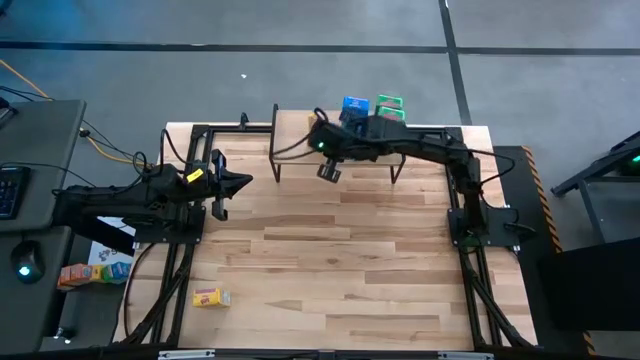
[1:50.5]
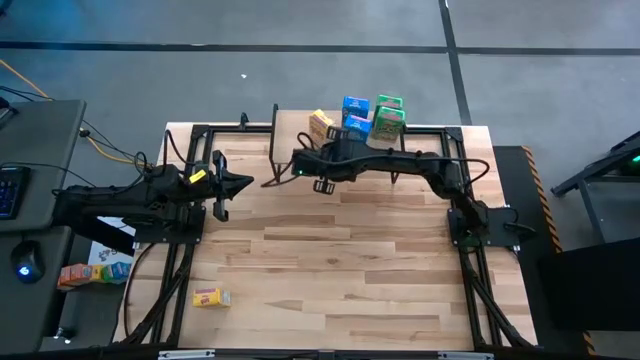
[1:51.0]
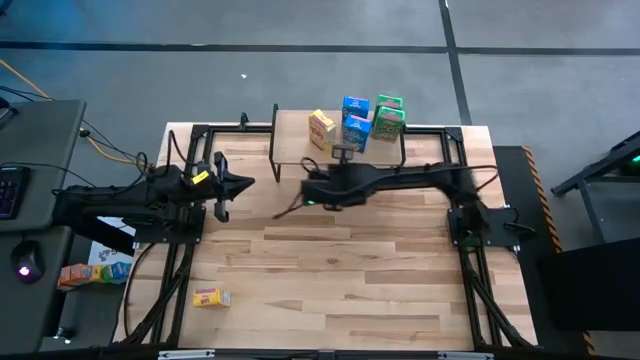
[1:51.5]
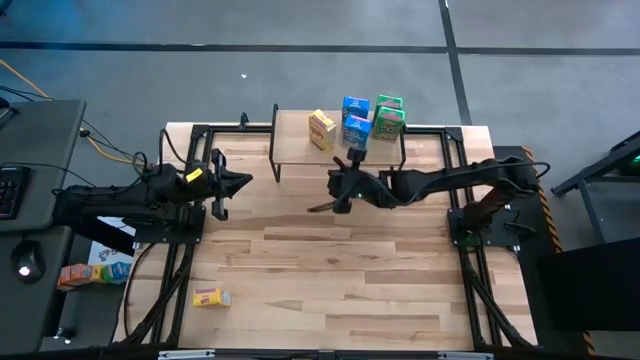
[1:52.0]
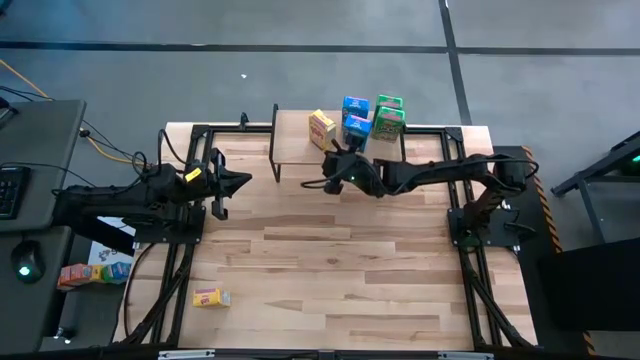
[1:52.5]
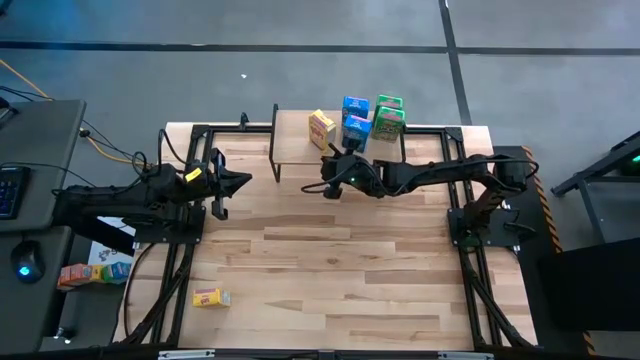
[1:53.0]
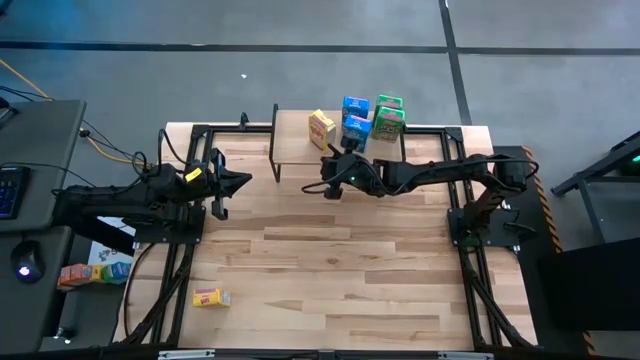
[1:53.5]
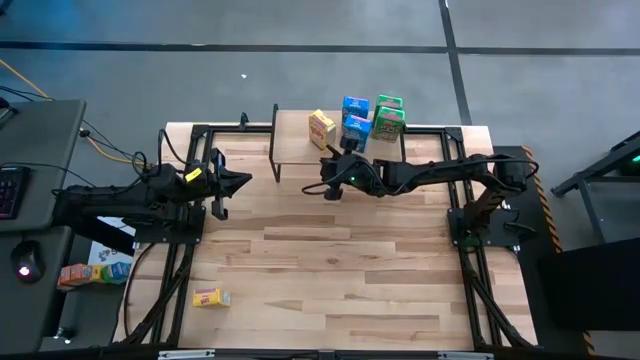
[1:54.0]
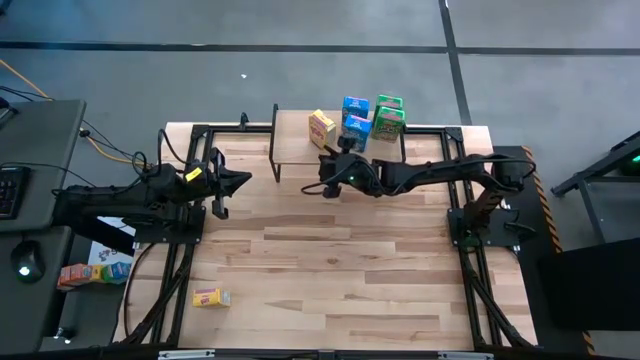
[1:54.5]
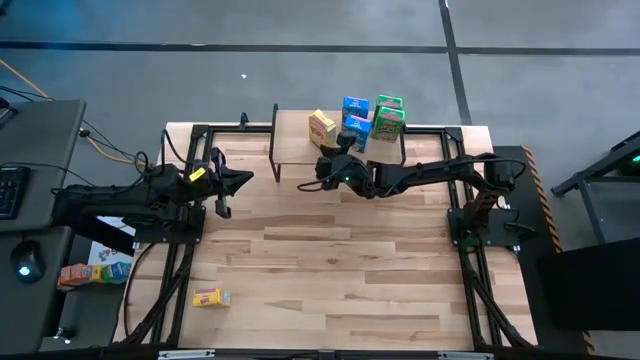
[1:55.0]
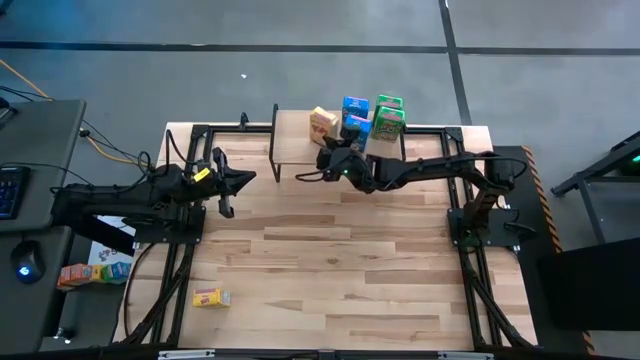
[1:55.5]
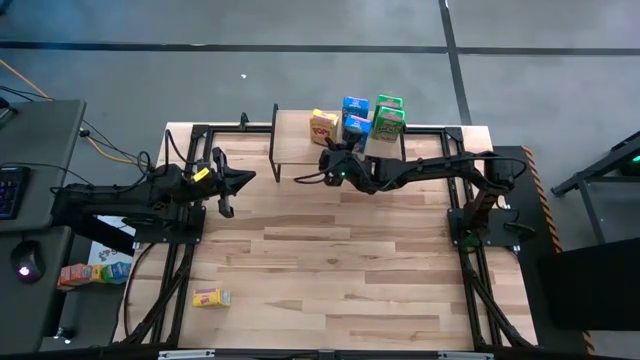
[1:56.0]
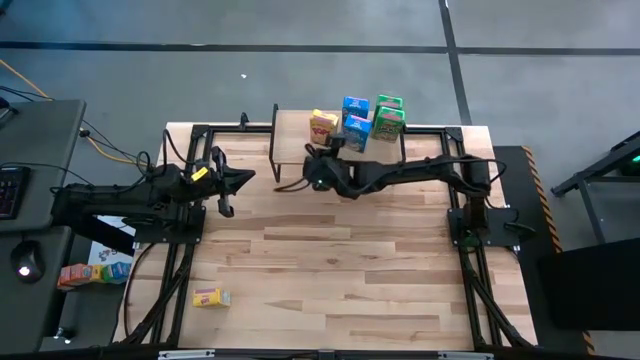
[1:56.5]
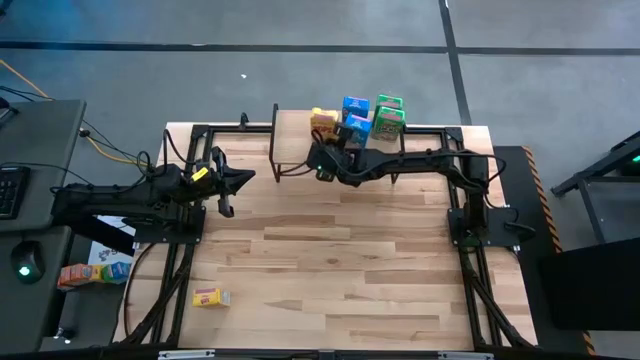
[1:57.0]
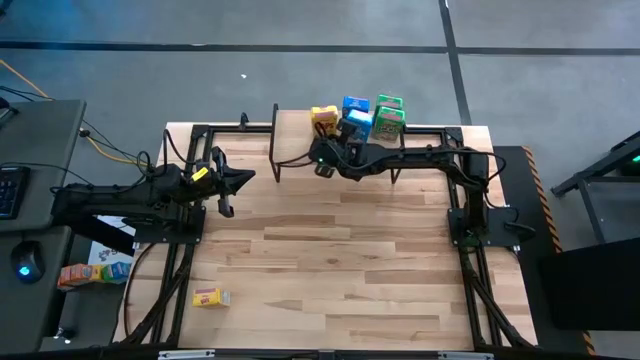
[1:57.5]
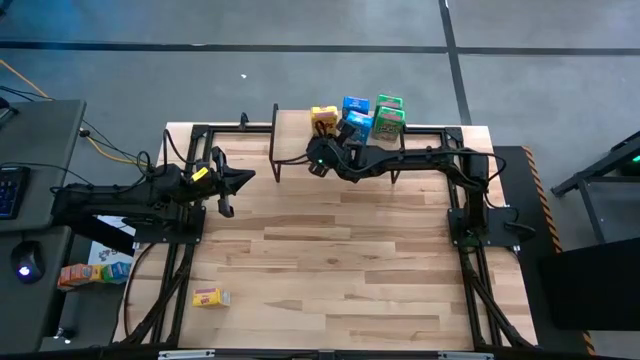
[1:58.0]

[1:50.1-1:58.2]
Task: Stack cereal on shelf
Adjust the Yellow cereal box to be next to the blue cereal boxes

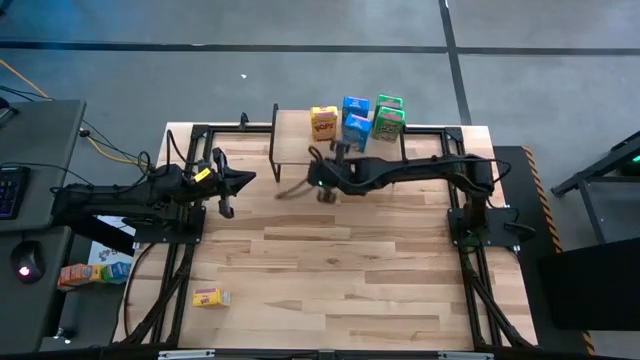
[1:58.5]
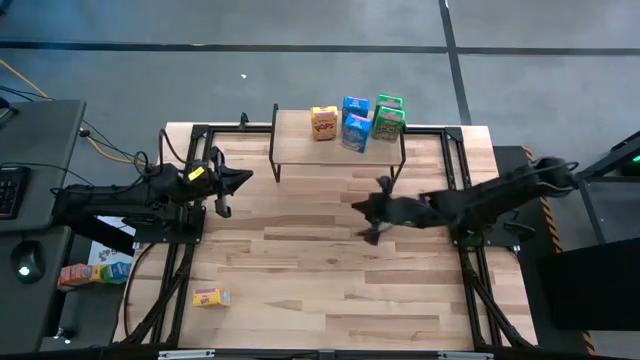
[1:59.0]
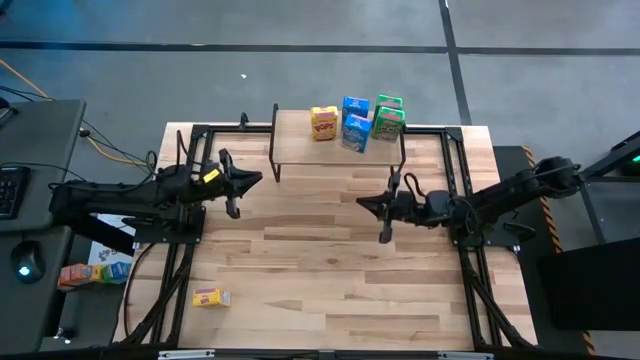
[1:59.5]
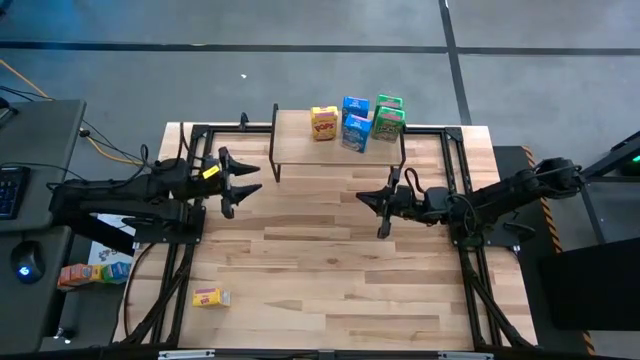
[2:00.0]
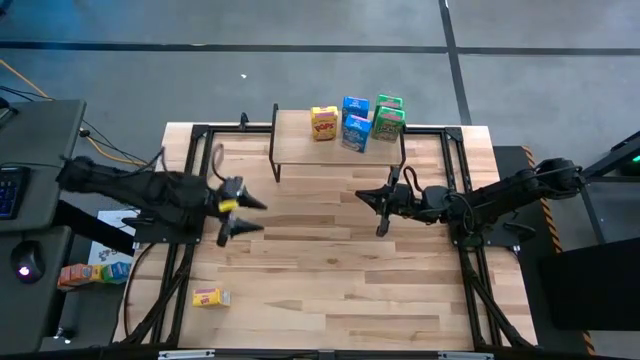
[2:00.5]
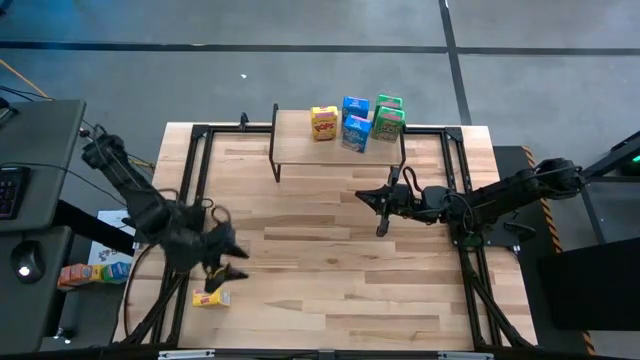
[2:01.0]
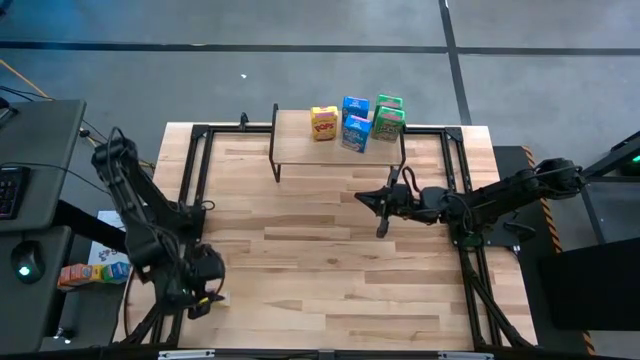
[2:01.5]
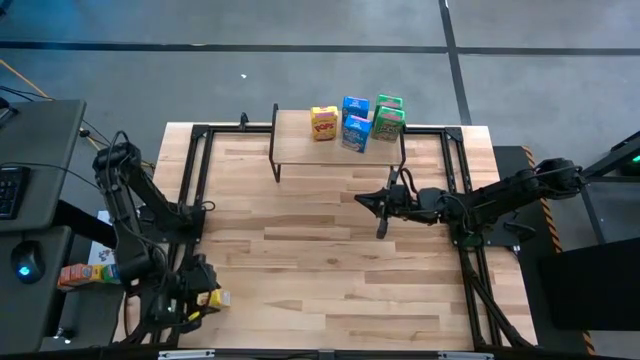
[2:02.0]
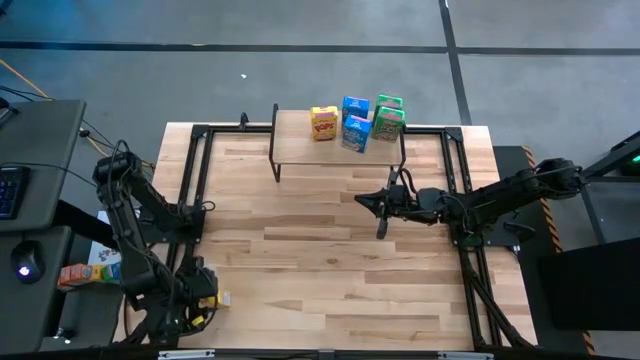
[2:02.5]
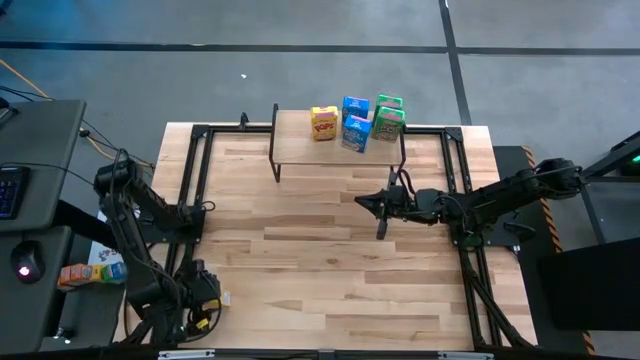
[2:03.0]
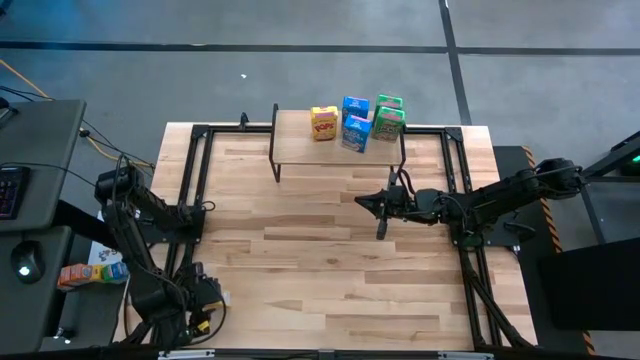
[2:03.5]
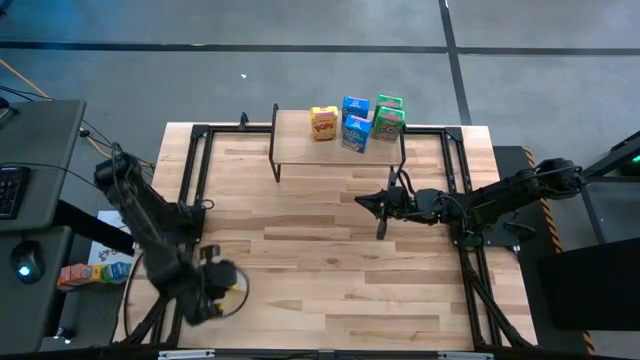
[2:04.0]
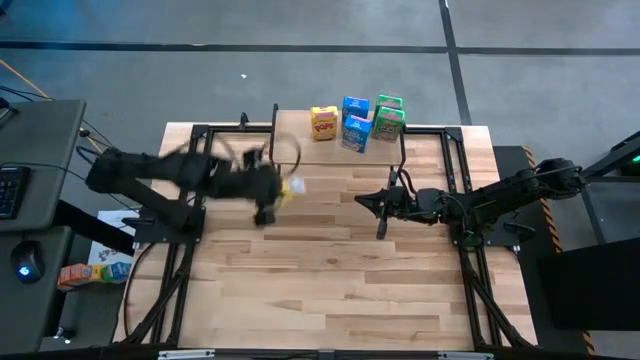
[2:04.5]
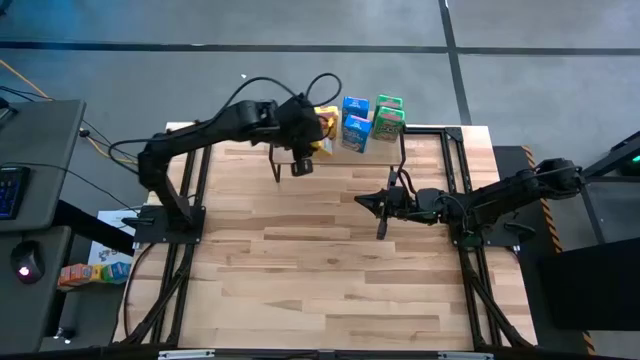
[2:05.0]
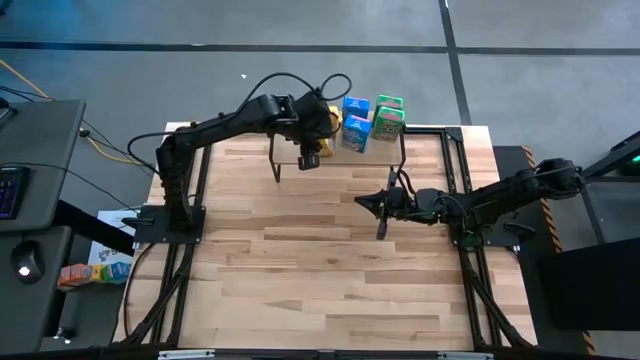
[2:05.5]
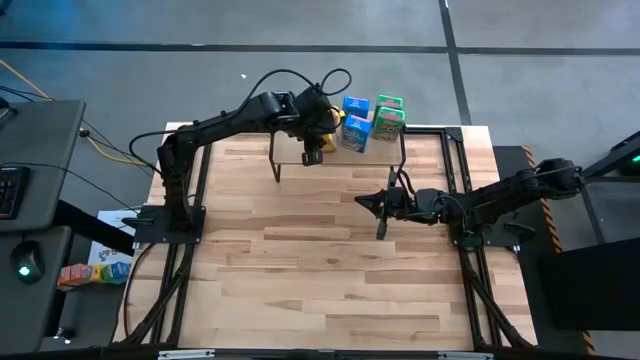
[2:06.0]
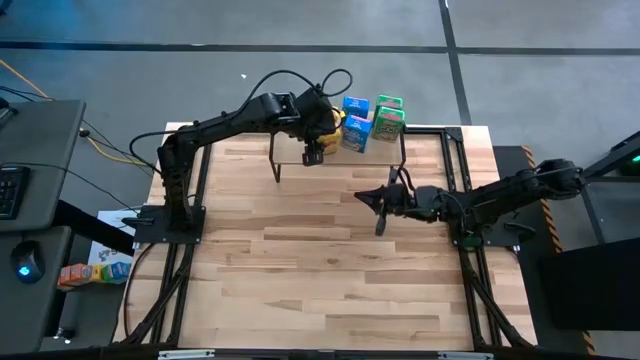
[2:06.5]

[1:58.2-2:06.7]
Put the yellow cereal box on the shelf

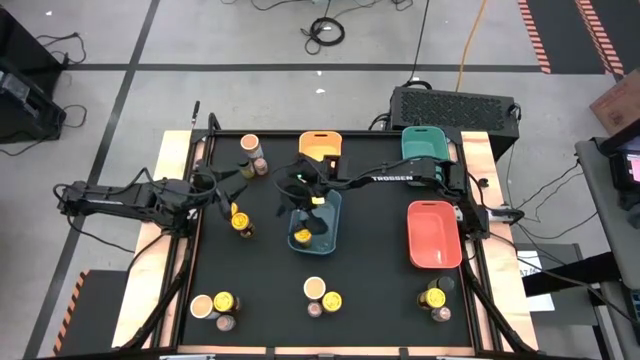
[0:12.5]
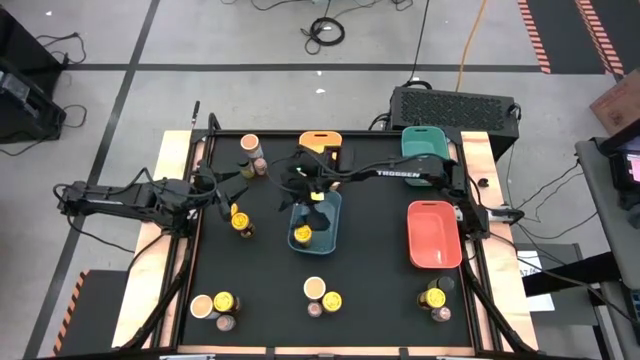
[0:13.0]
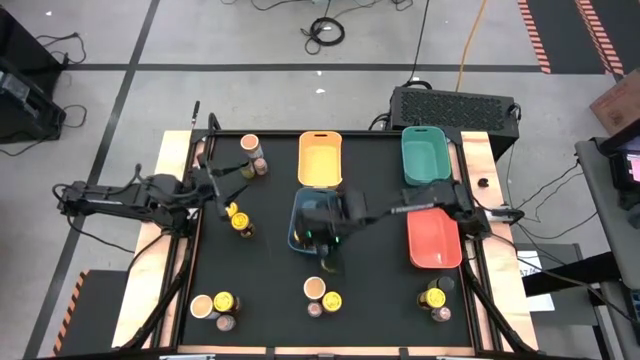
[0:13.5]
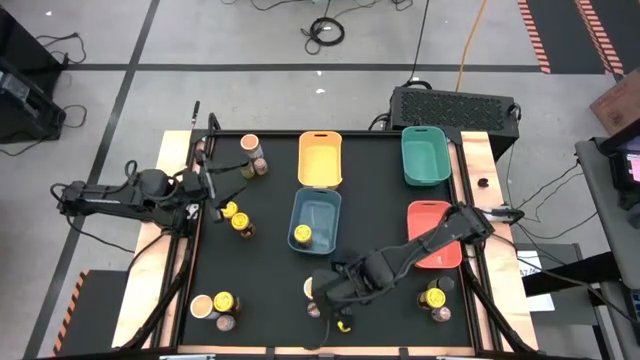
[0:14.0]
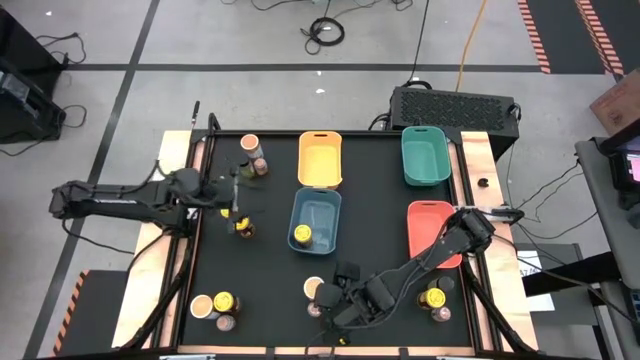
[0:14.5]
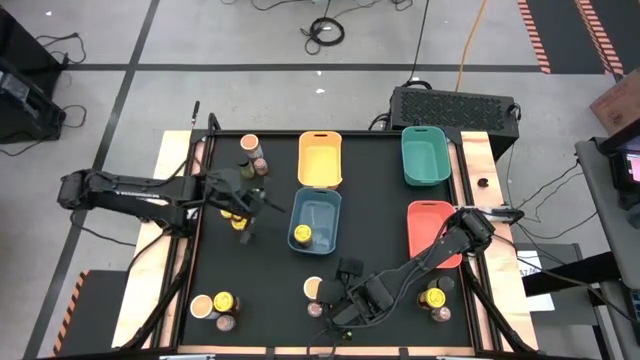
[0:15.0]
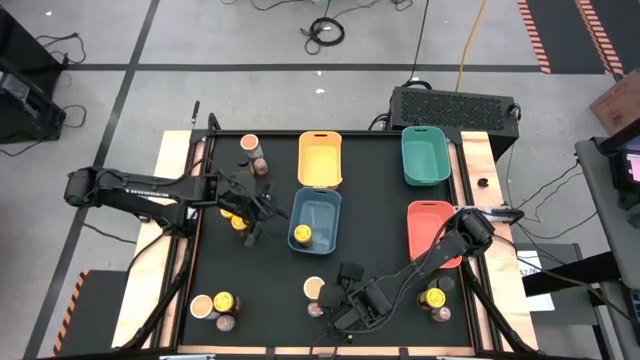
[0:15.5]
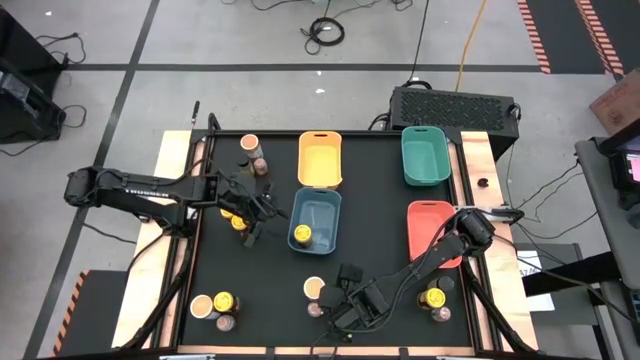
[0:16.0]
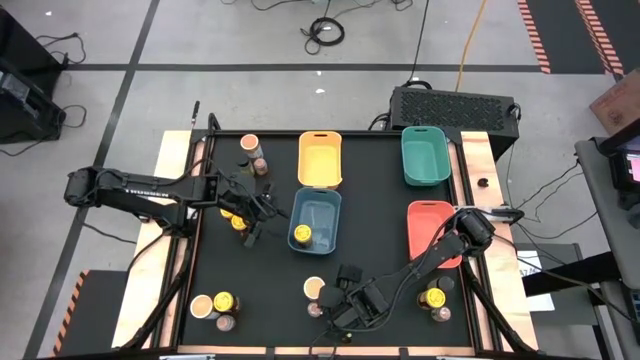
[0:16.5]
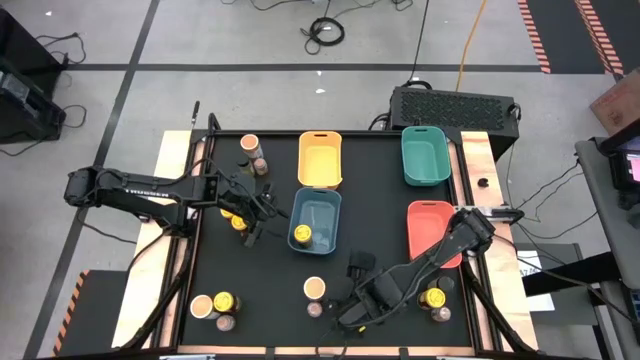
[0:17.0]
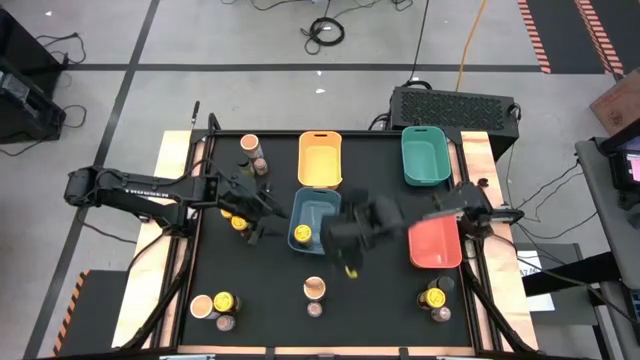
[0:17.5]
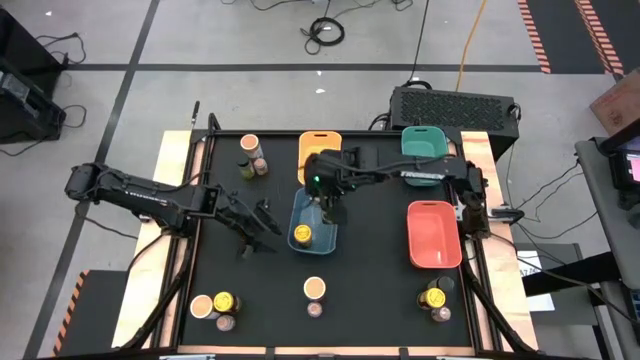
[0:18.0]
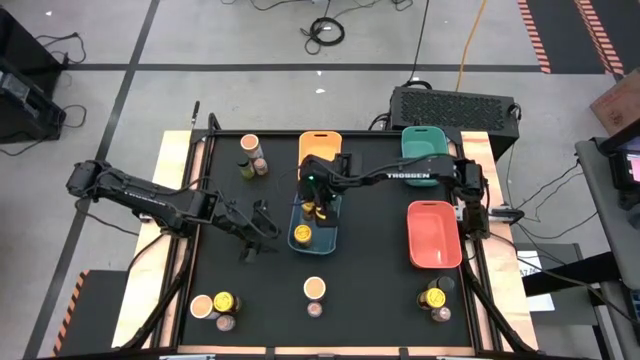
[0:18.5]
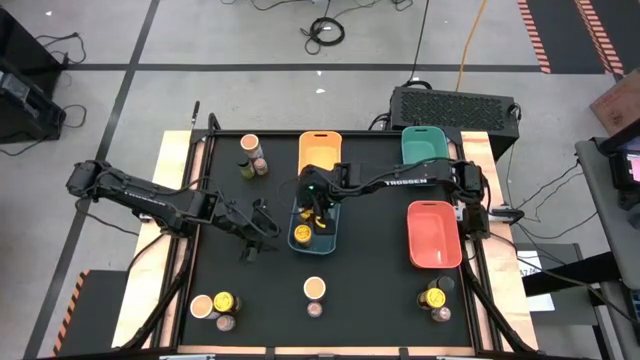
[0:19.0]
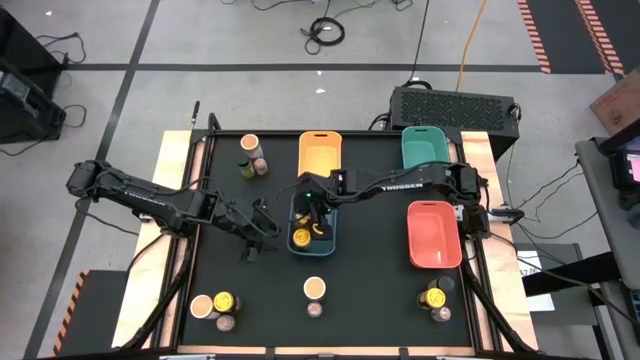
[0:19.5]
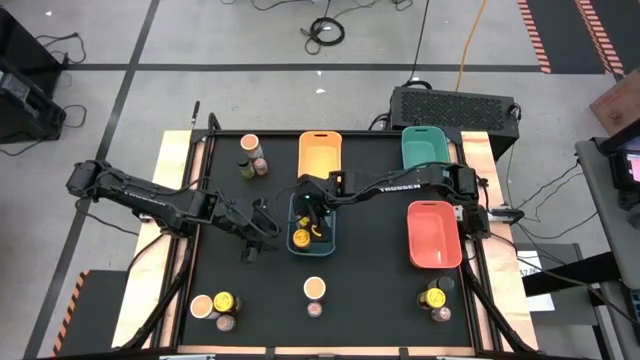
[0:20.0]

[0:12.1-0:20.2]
Task: Sort spices by type
Put the yellow seasoning bottle into the dark blue bin
